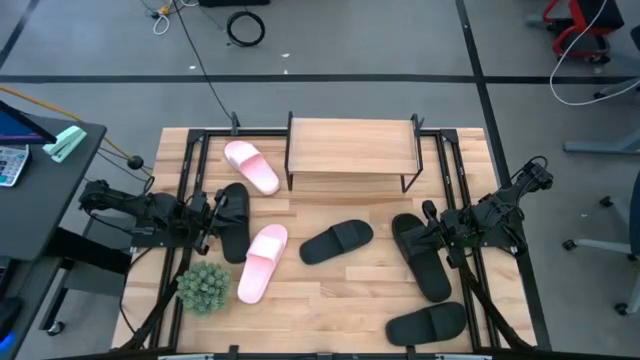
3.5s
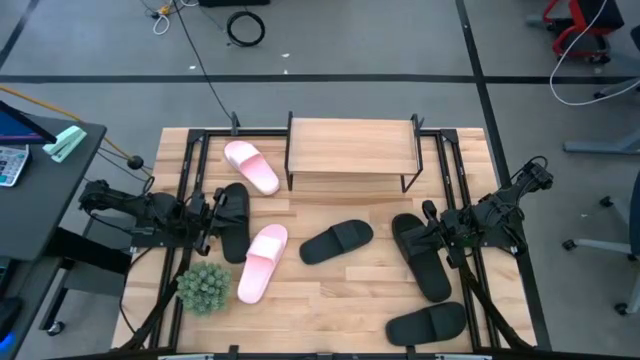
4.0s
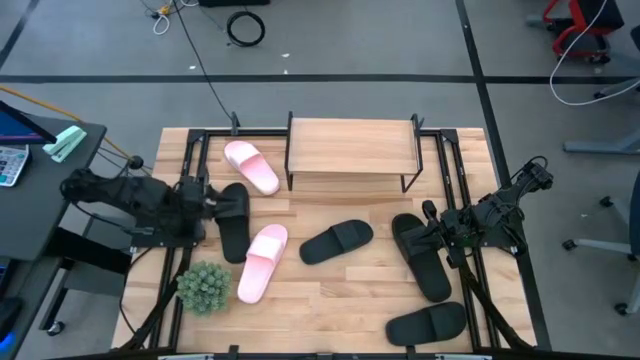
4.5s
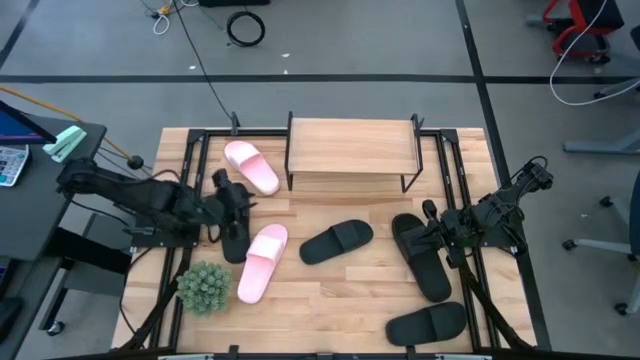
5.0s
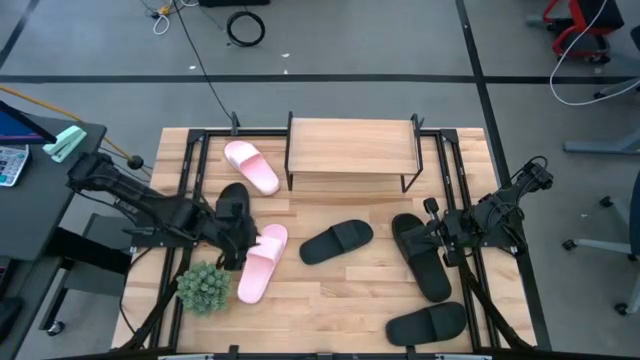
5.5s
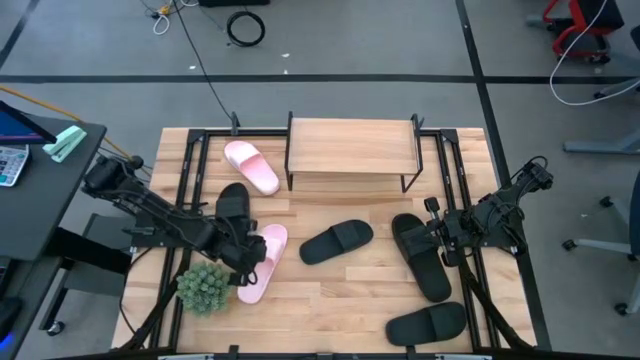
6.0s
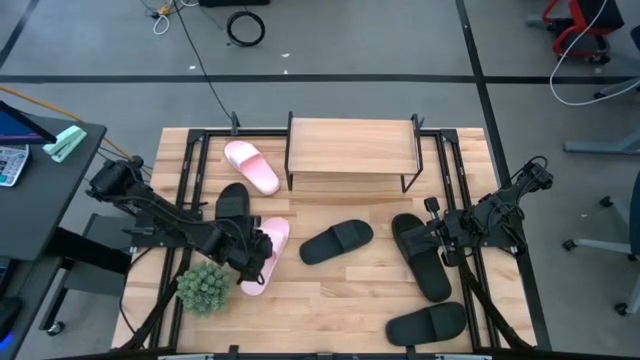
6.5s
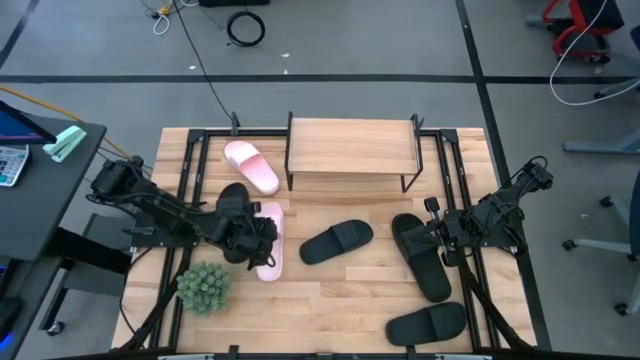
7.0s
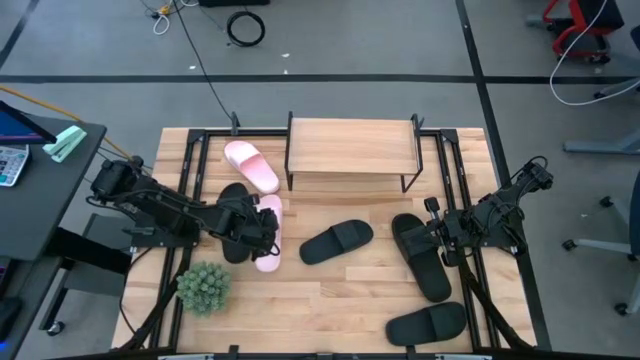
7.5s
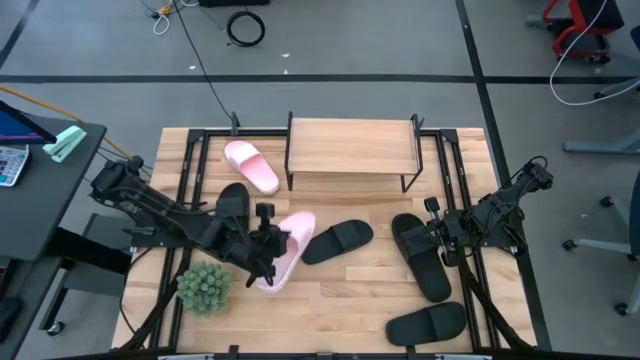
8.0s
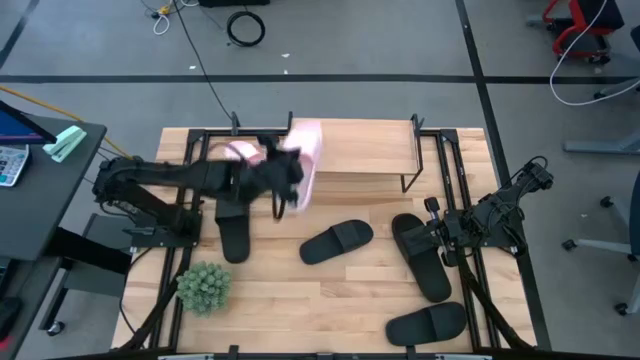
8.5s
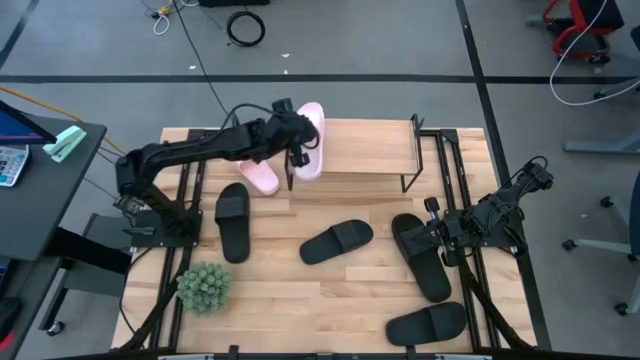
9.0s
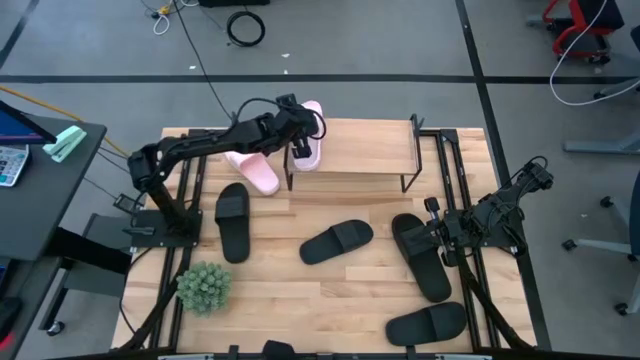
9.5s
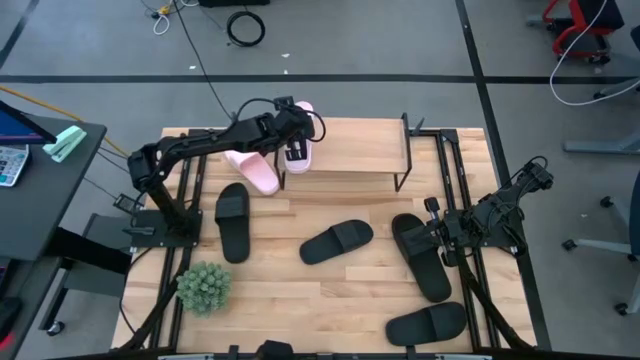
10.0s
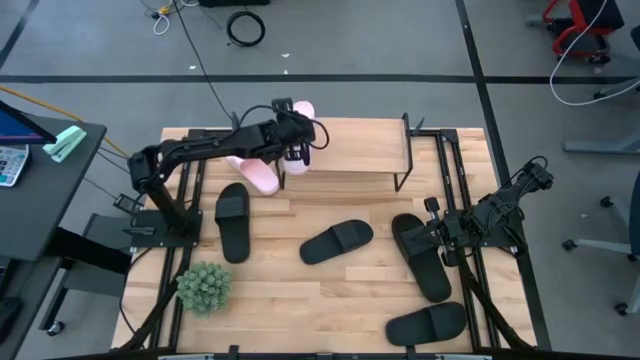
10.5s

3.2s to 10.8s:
Task: Pick and place slides into the shelf
Put the pink slides on the shelf

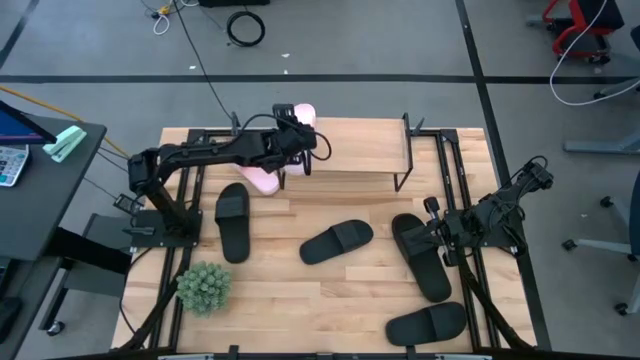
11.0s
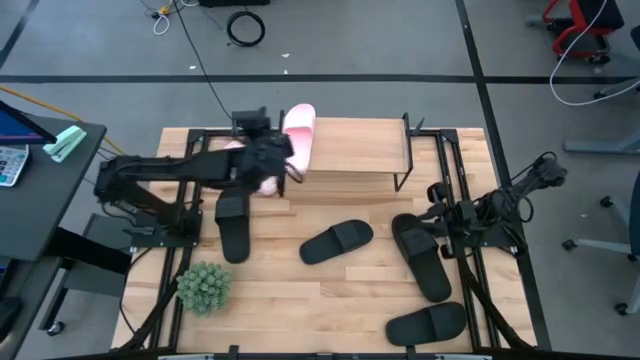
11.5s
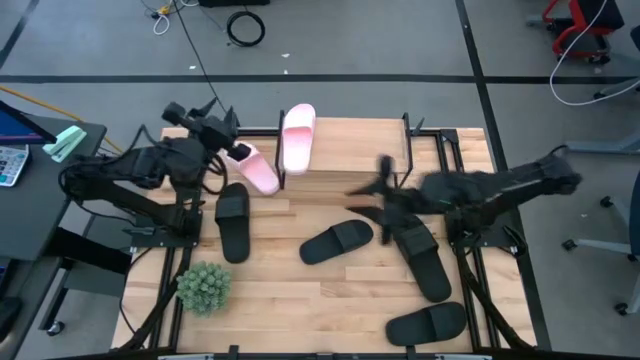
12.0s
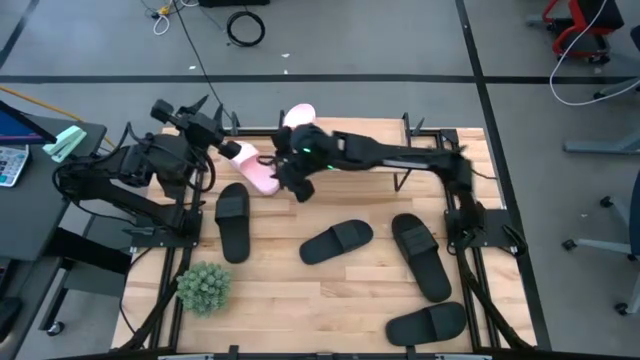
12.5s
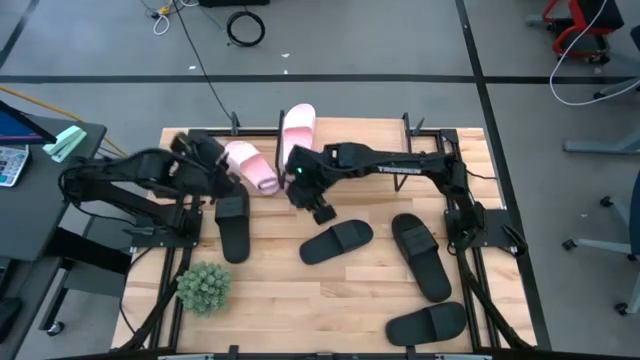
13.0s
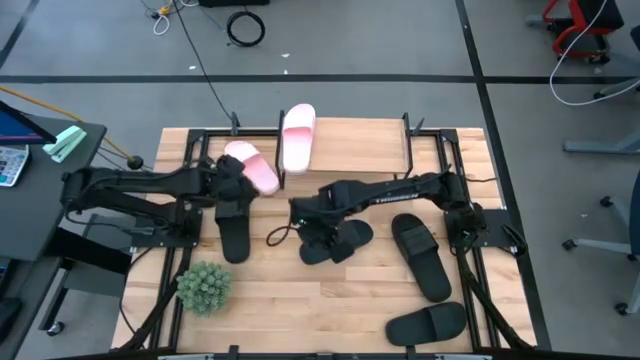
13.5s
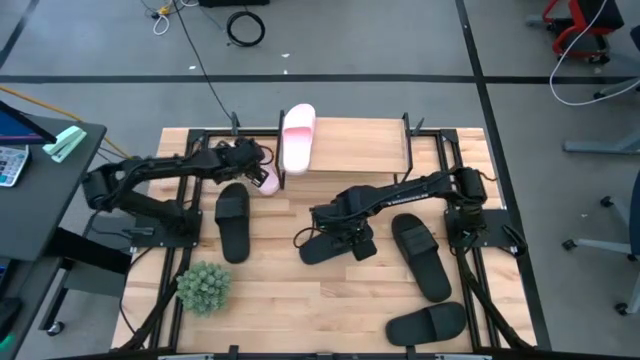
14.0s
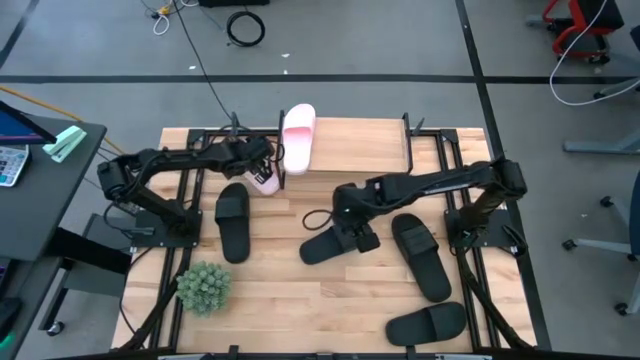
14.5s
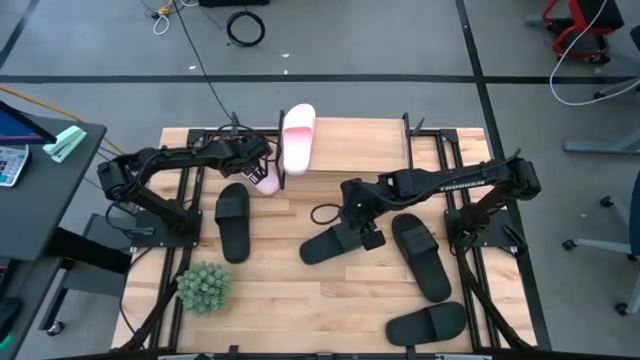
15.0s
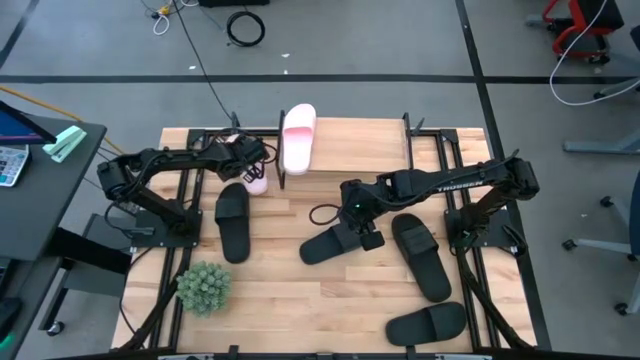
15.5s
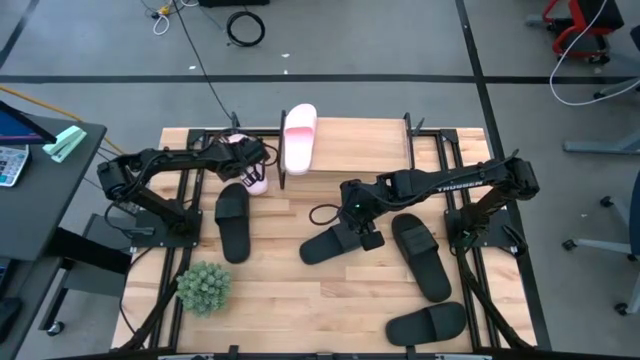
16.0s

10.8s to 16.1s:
Put the pink slides on the shelf

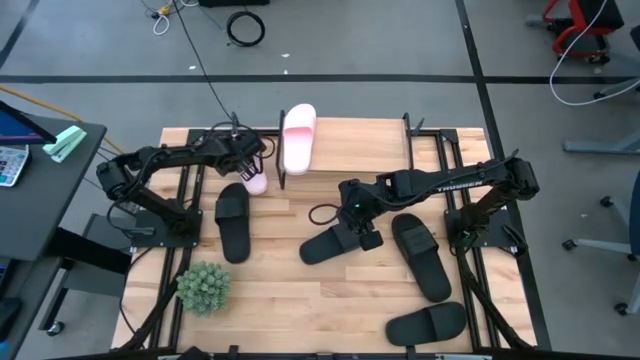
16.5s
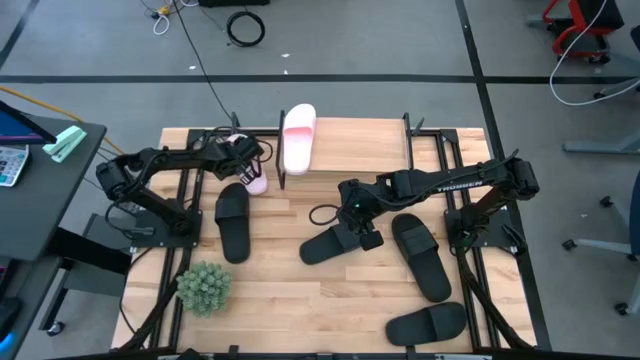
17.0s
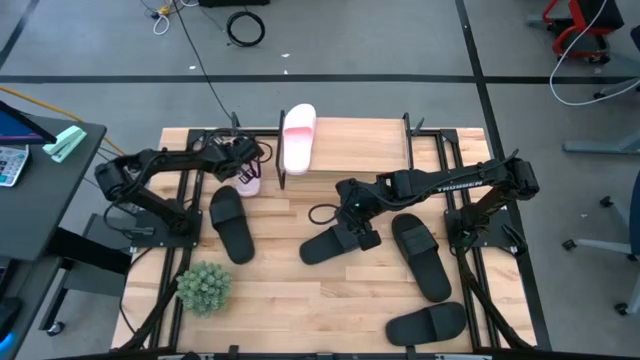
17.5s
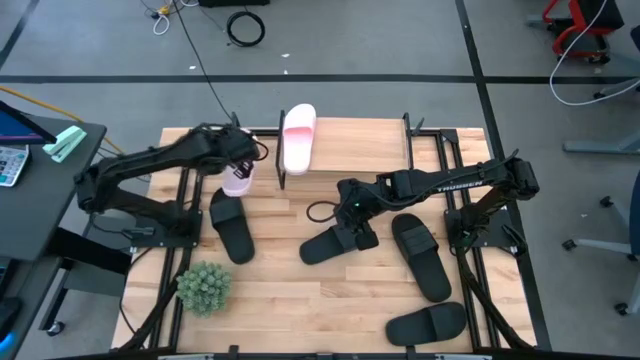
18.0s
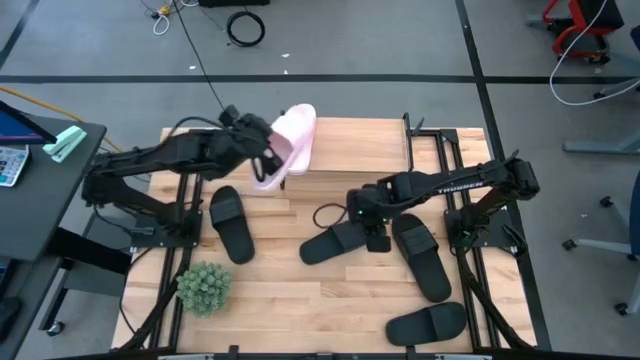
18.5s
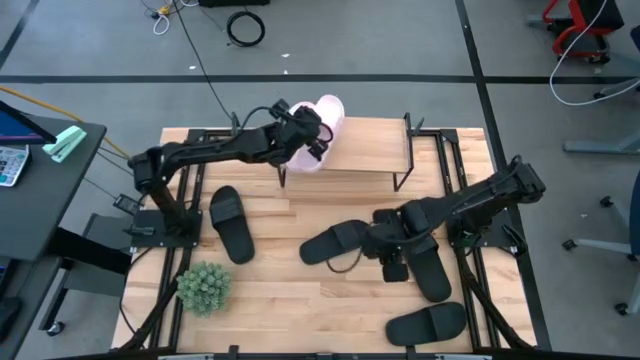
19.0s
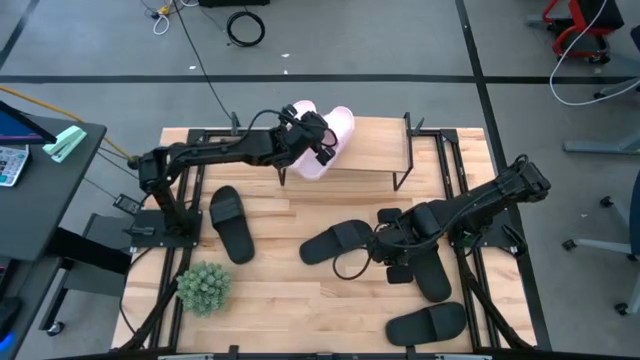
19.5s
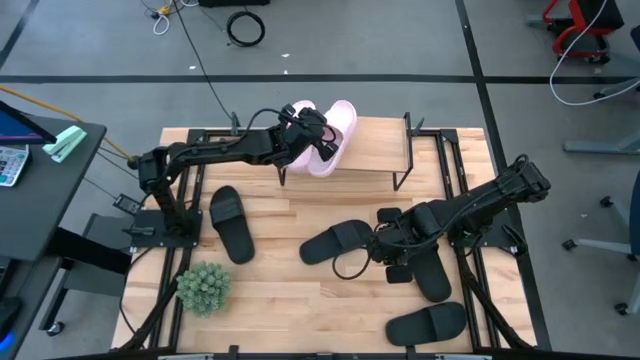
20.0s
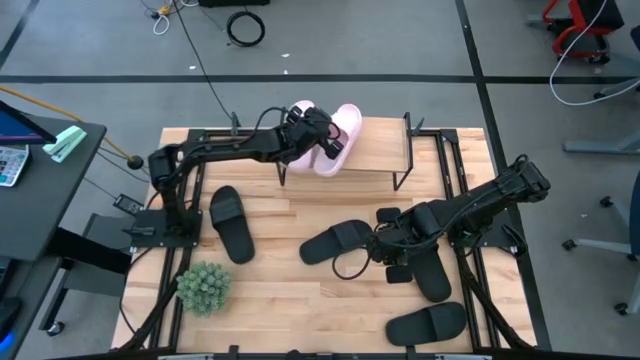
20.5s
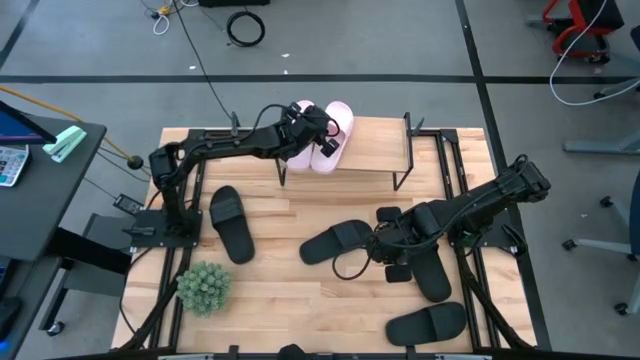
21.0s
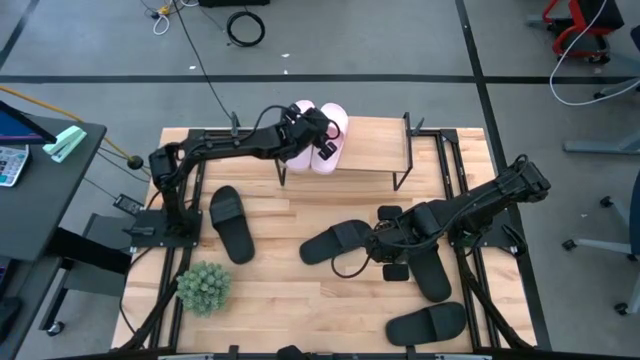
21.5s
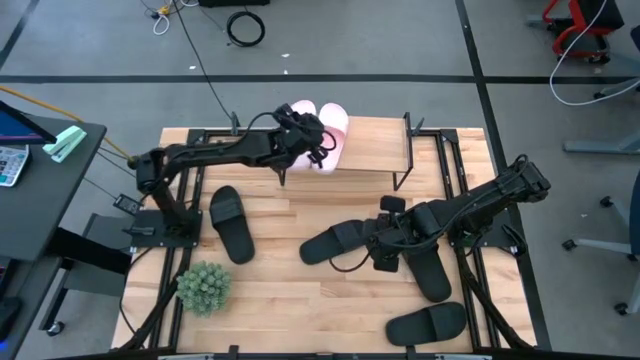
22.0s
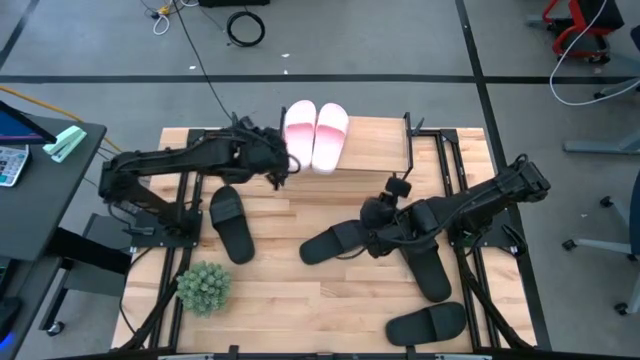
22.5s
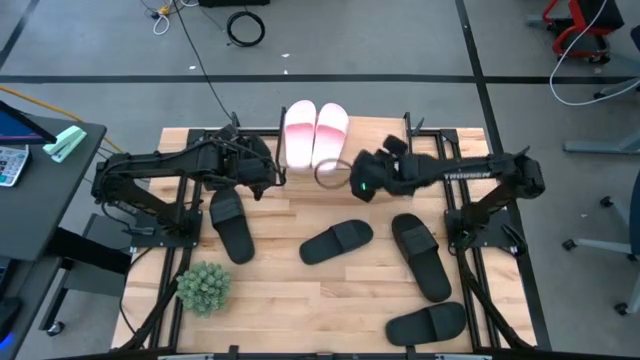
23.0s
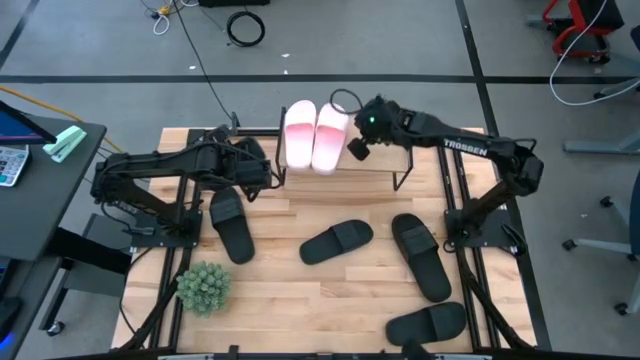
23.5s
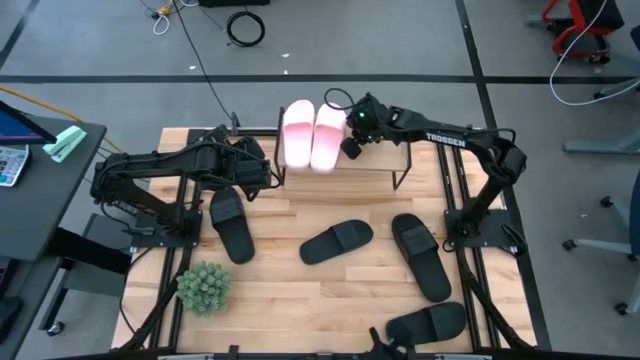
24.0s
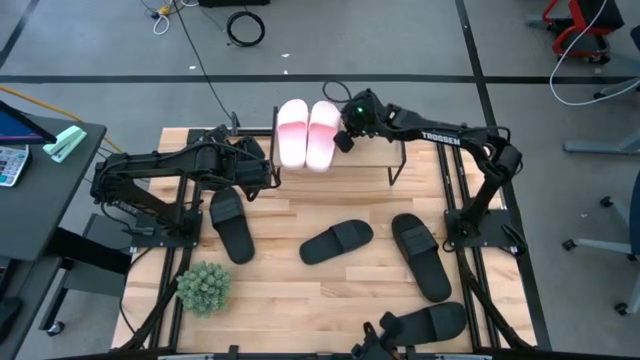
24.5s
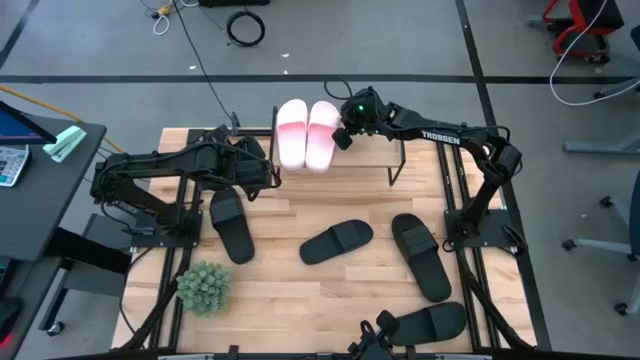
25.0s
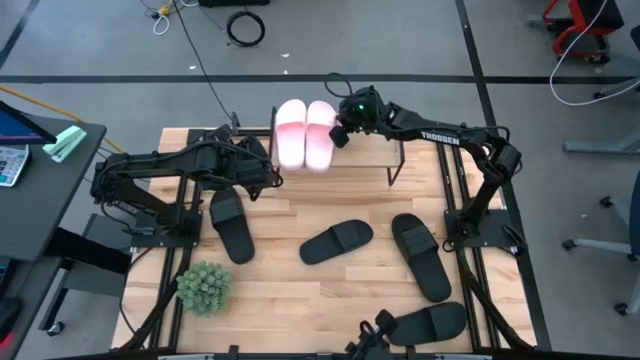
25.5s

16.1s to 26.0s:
Put the pink slides on the shelf
